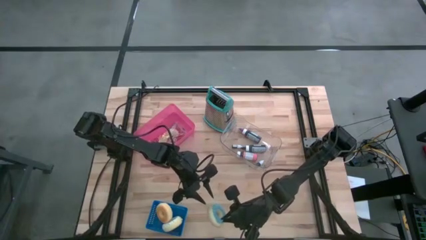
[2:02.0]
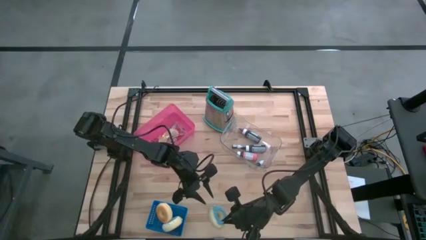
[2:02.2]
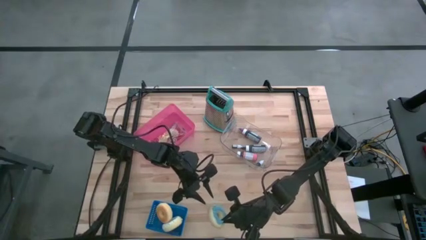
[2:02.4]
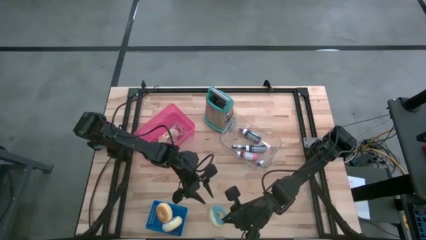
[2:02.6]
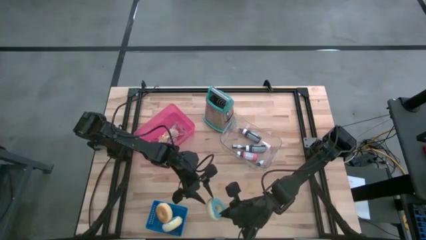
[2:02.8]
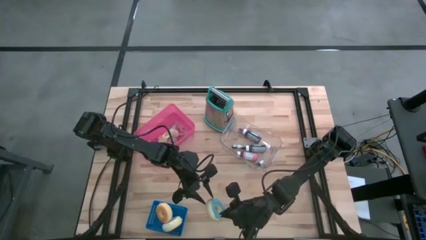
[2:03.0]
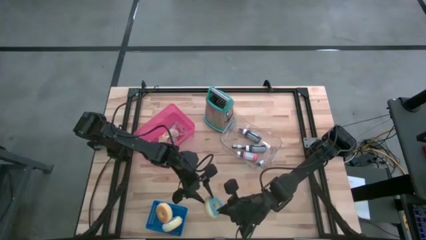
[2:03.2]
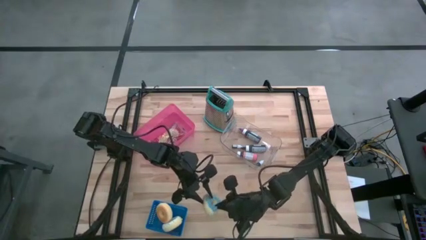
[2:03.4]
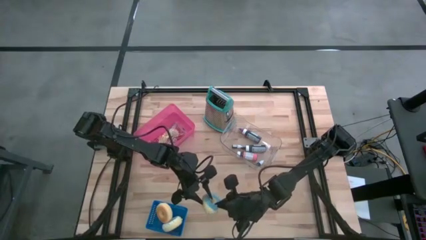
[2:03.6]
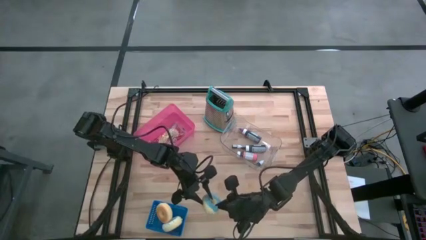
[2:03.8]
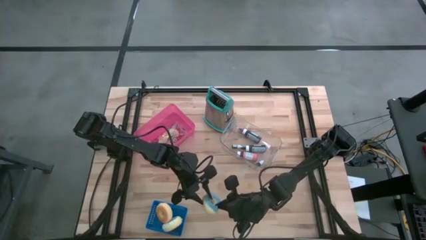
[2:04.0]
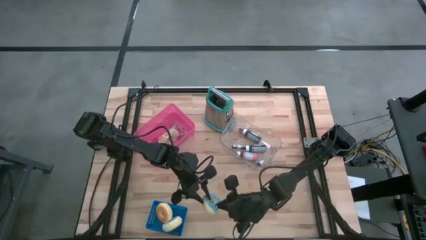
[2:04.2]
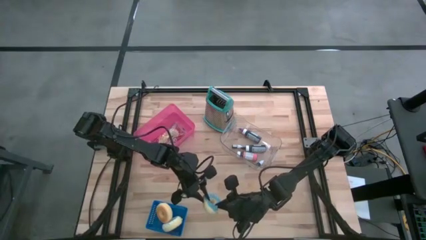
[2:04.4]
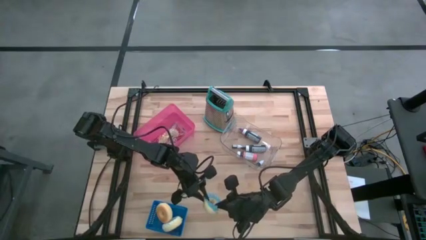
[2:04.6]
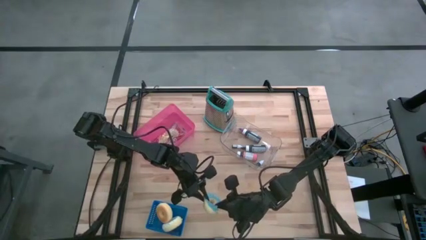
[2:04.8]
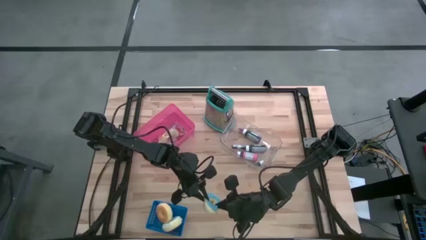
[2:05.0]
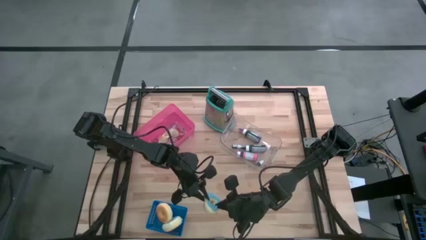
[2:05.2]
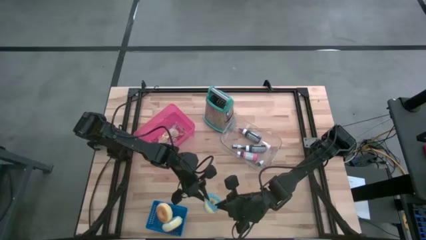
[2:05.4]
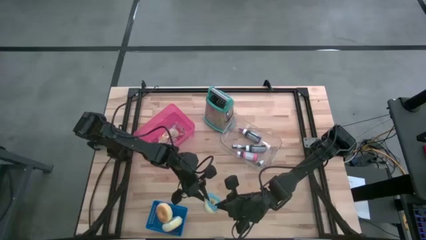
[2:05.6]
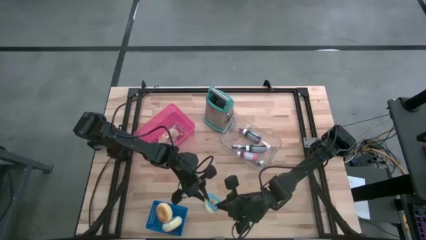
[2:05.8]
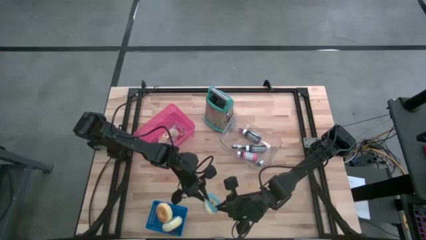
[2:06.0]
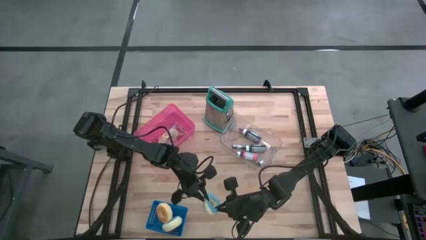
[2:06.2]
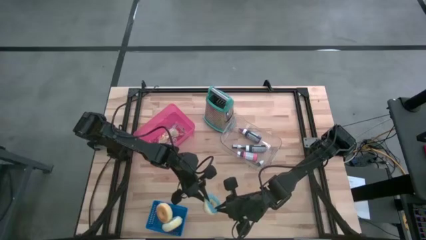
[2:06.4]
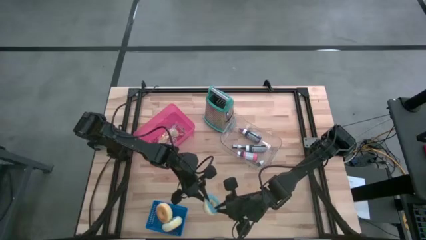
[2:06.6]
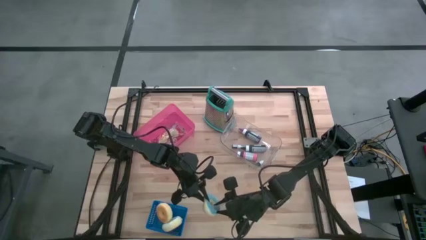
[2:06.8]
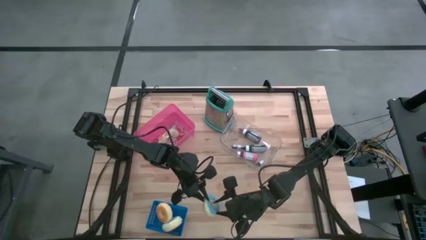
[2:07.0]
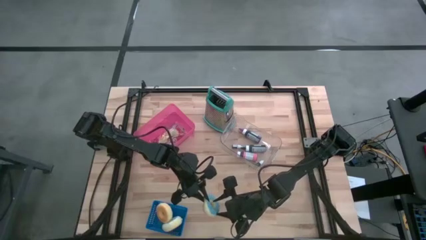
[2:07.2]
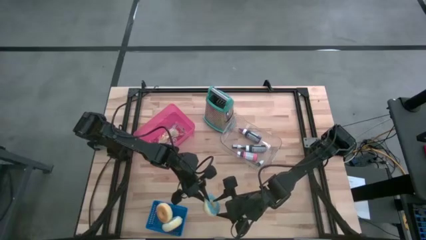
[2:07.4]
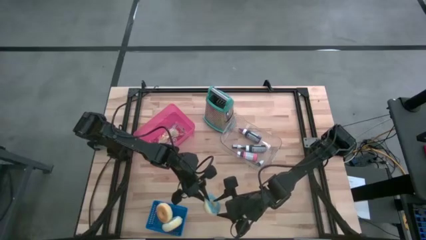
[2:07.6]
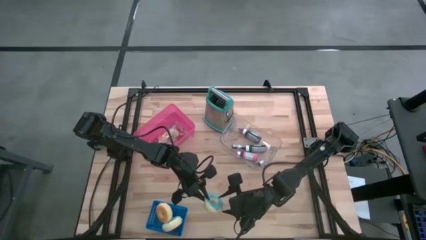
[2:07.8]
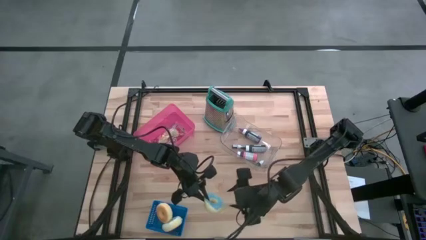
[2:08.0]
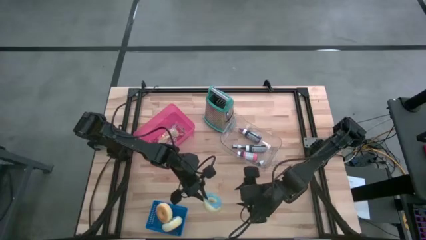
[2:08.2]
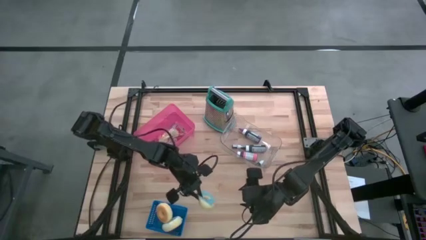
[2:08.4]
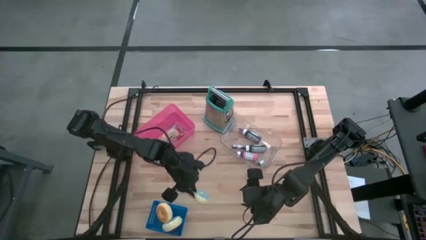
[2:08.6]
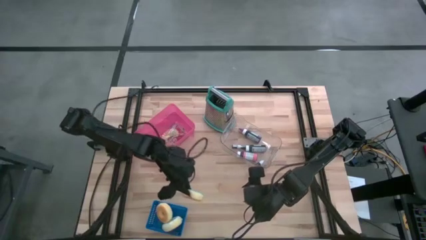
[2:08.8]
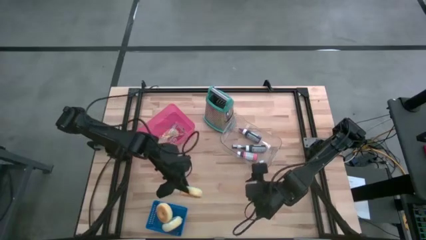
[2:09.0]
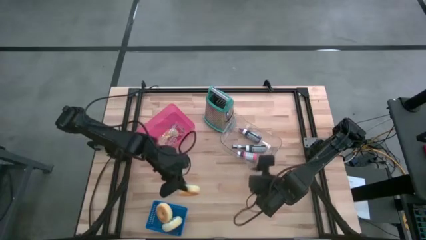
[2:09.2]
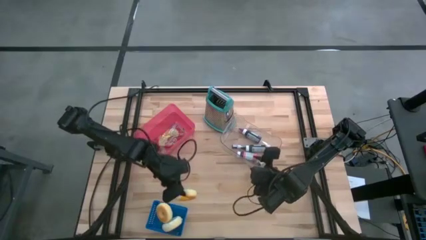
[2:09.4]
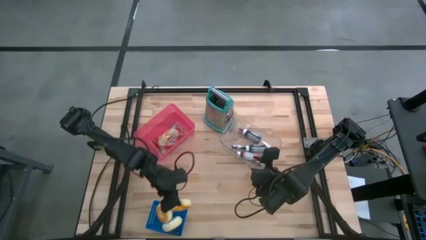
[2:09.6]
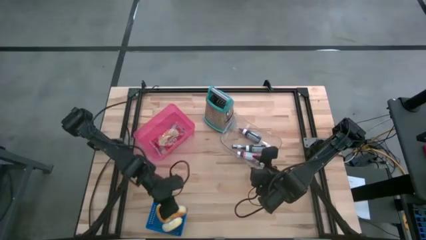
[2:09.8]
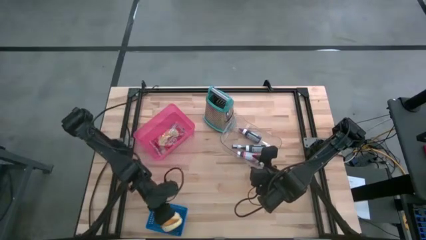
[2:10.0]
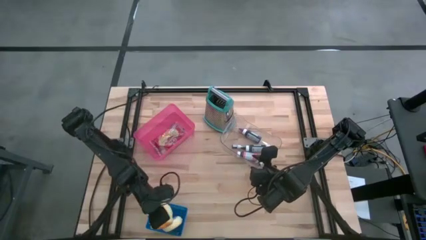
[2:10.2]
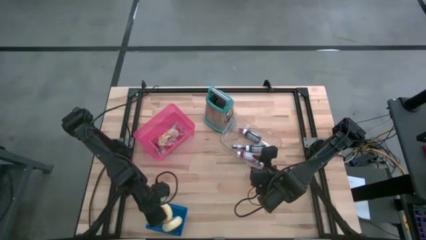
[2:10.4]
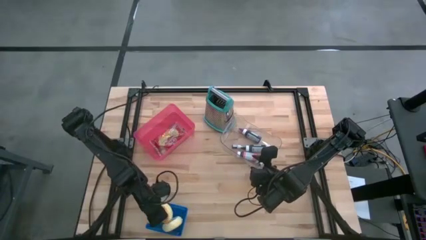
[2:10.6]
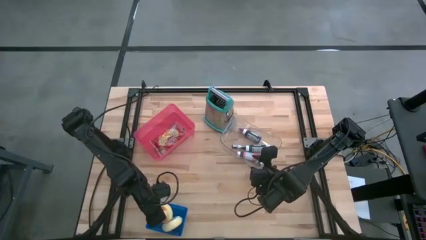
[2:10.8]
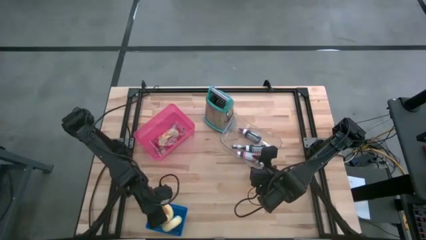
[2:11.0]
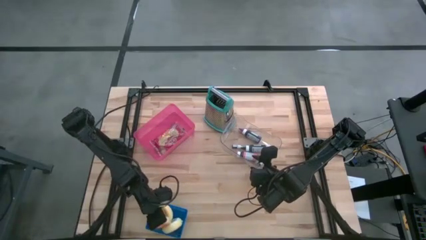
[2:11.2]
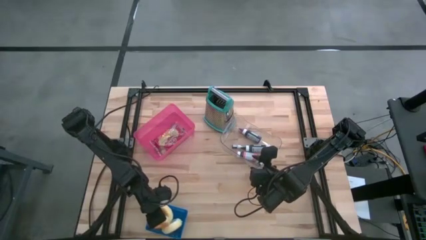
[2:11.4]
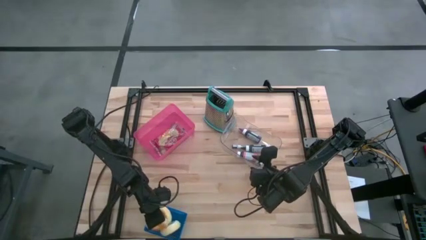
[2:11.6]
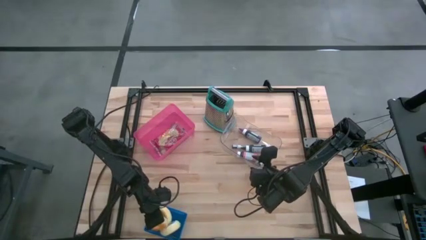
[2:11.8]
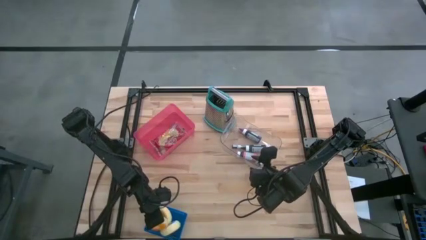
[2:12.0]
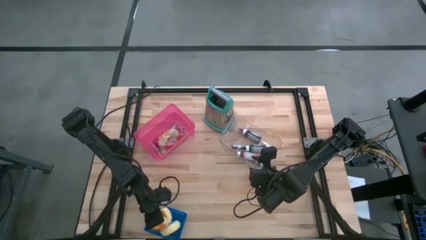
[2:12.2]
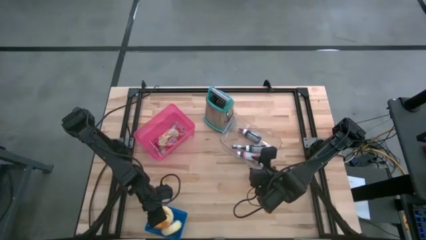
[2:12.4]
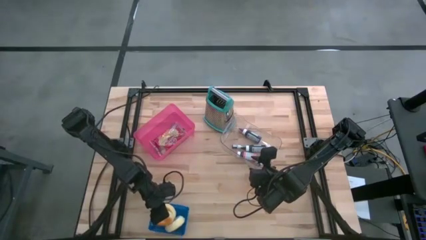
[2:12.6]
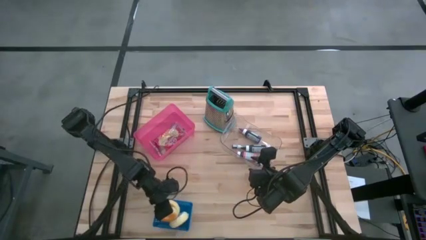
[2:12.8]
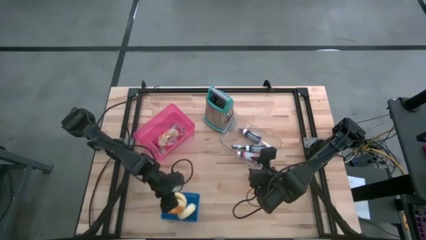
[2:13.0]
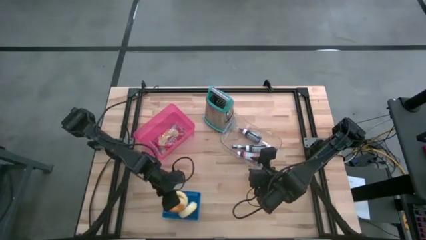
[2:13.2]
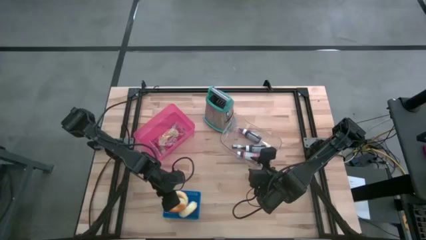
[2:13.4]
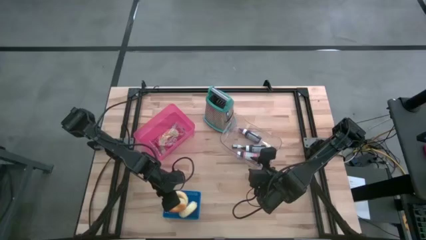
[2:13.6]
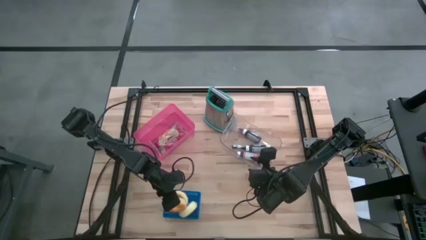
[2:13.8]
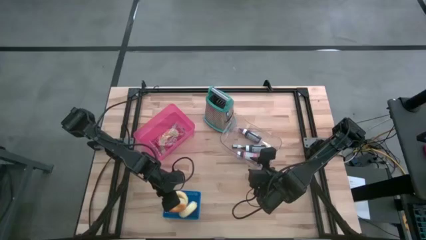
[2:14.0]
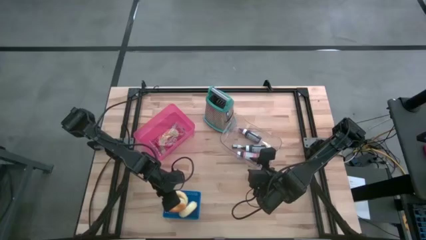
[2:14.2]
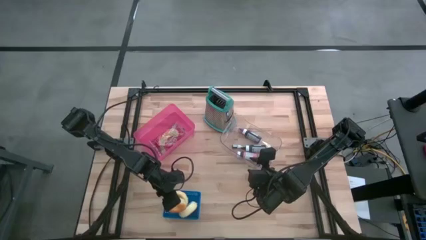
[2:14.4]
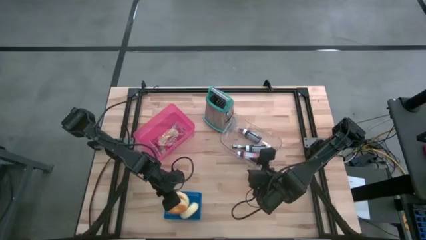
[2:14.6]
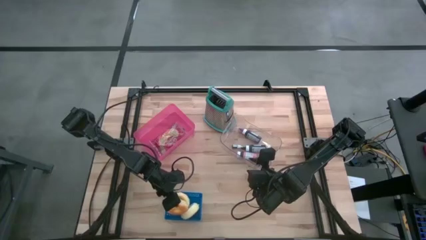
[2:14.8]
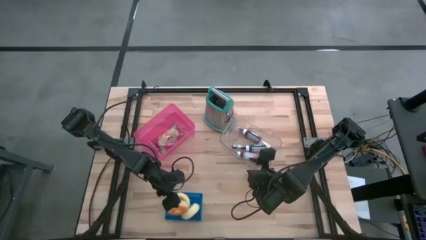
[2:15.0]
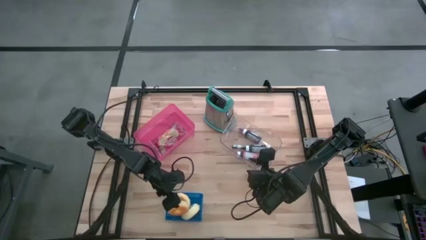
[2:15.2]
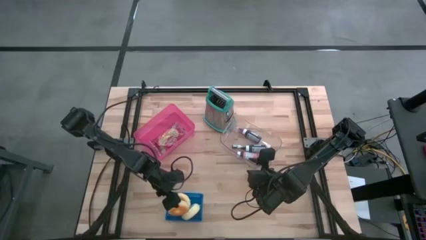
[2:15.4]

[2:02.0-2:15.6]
Task: Pick & Place Food Item
Put the blue donut into the blue bin
